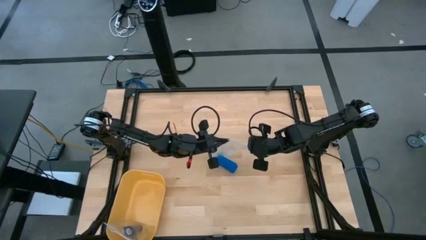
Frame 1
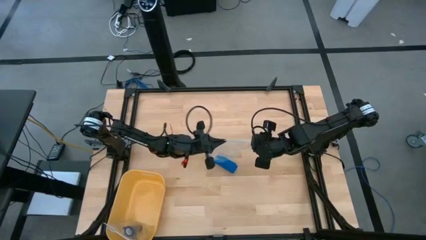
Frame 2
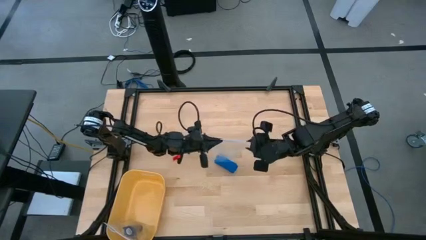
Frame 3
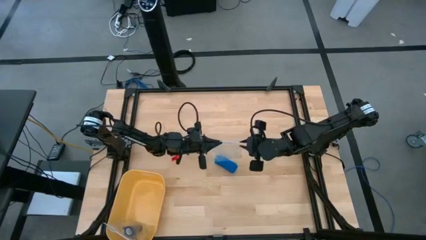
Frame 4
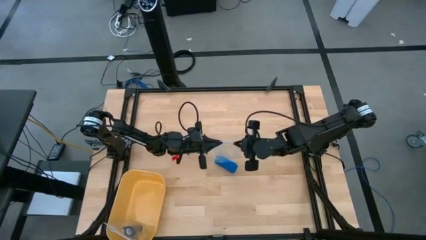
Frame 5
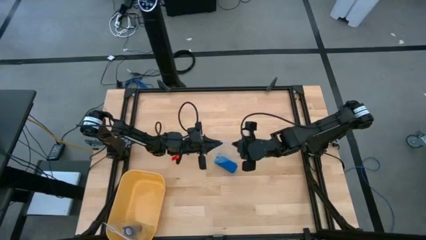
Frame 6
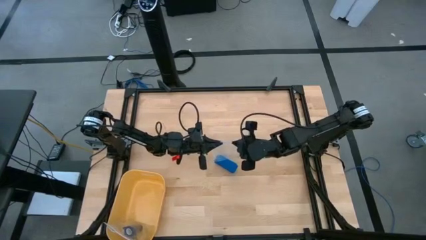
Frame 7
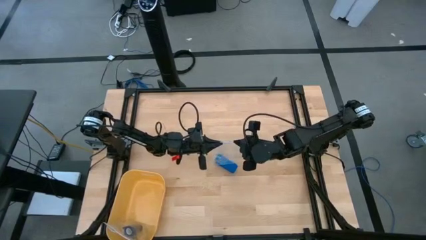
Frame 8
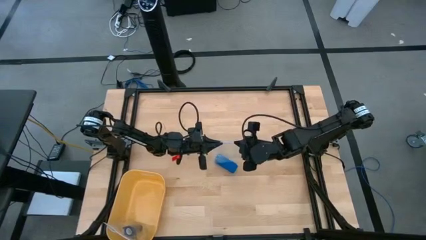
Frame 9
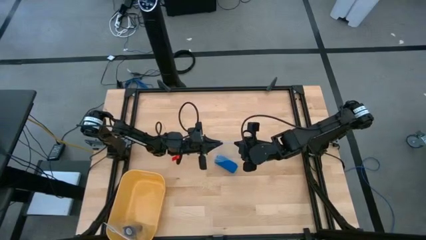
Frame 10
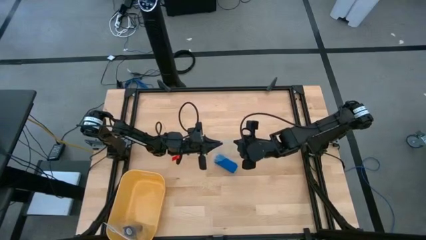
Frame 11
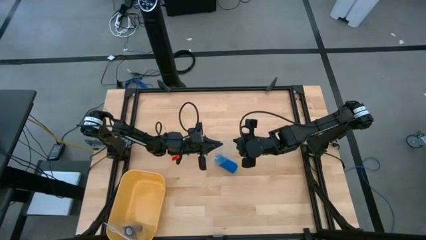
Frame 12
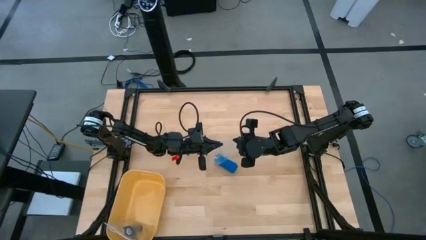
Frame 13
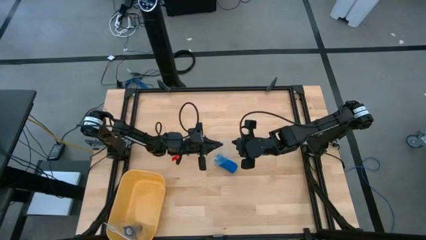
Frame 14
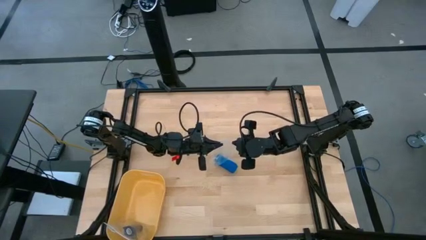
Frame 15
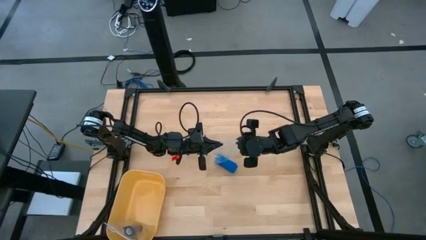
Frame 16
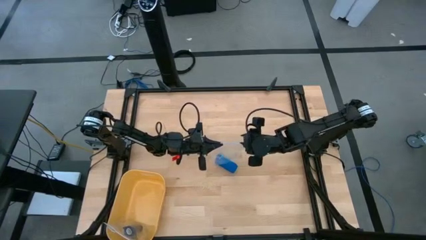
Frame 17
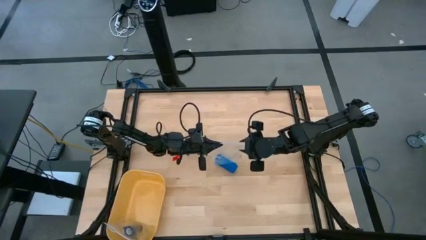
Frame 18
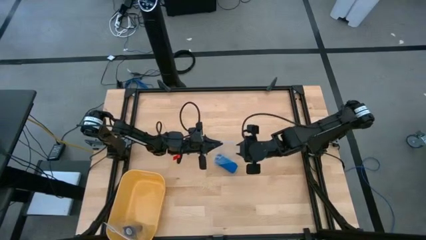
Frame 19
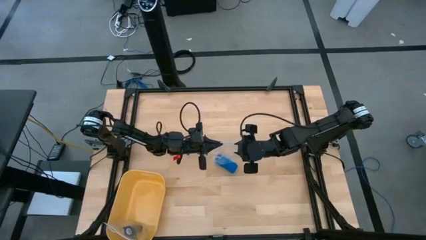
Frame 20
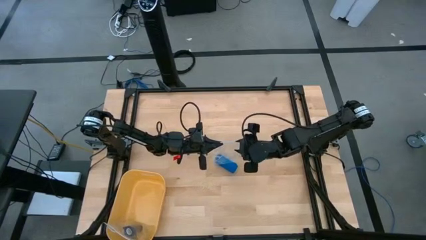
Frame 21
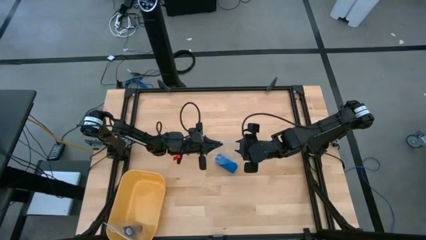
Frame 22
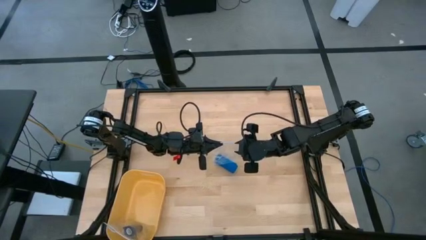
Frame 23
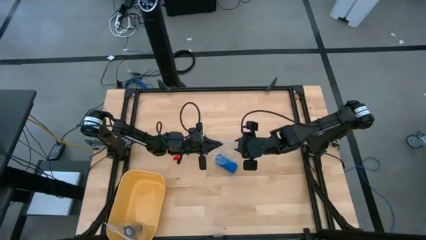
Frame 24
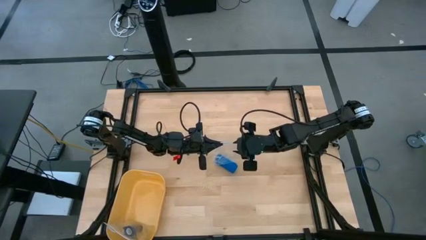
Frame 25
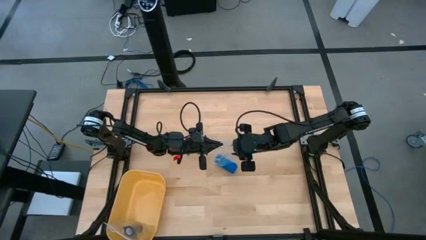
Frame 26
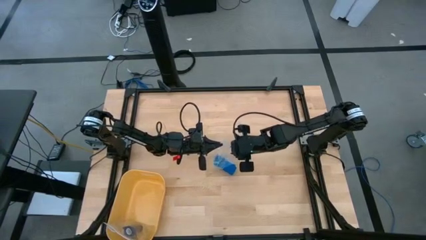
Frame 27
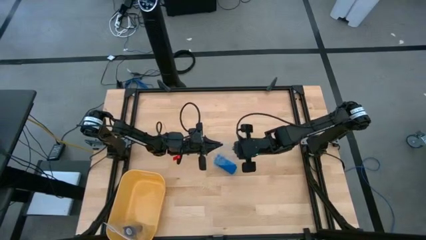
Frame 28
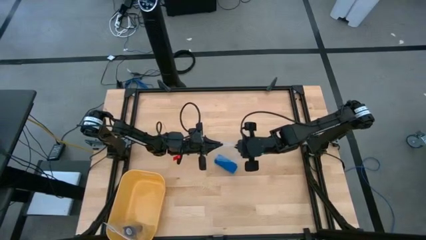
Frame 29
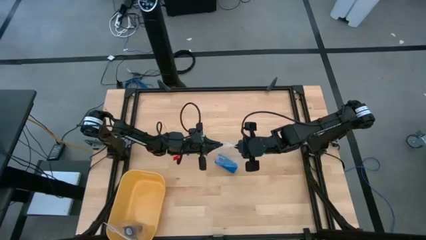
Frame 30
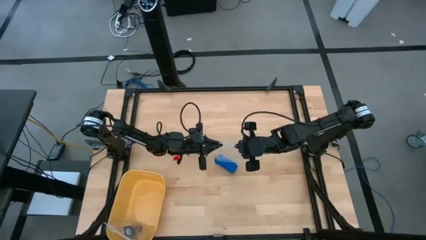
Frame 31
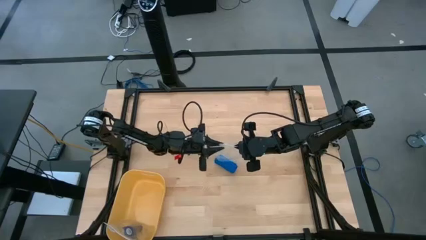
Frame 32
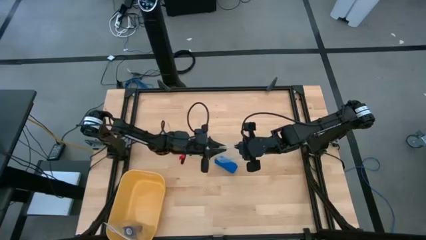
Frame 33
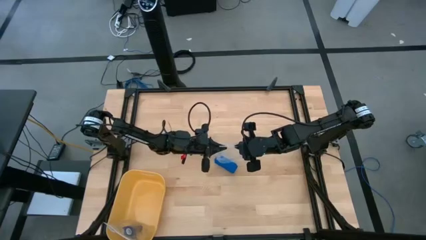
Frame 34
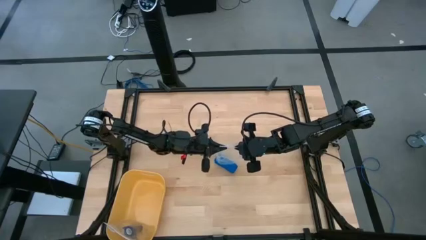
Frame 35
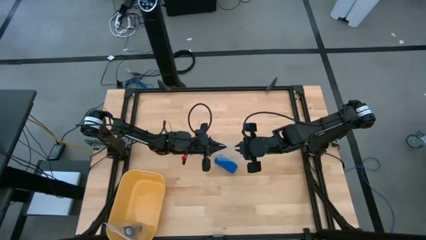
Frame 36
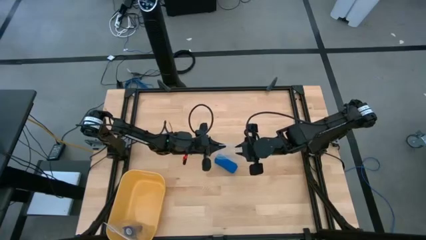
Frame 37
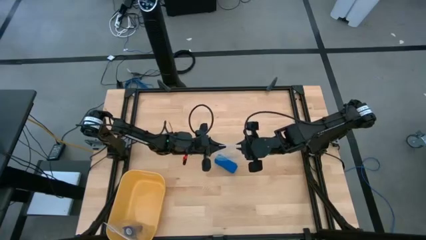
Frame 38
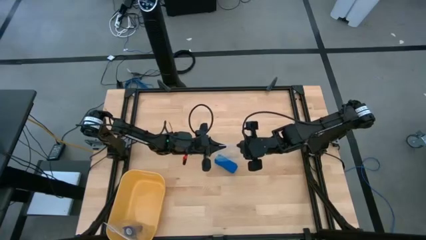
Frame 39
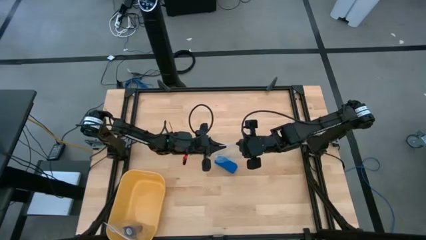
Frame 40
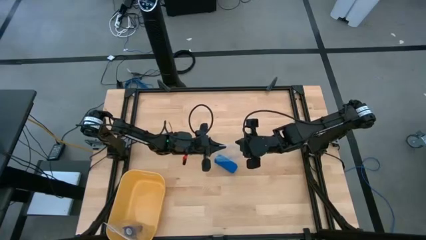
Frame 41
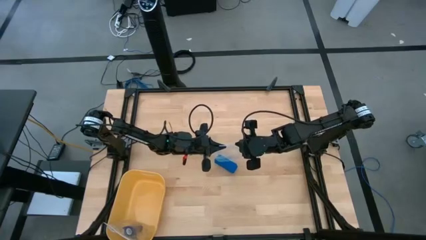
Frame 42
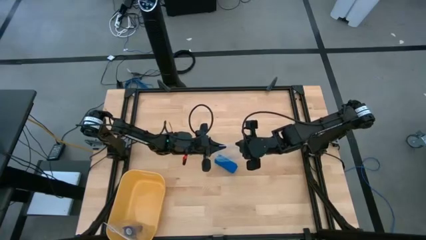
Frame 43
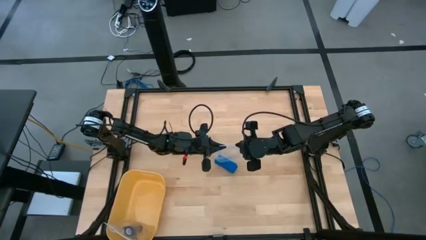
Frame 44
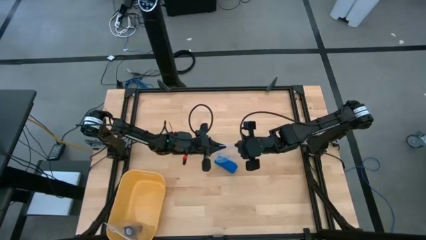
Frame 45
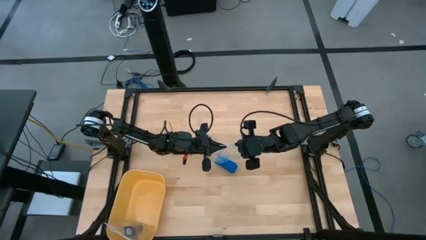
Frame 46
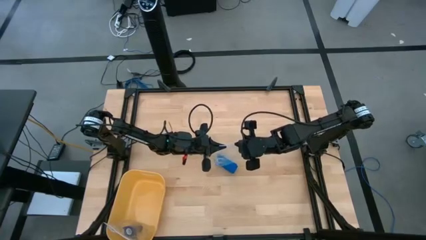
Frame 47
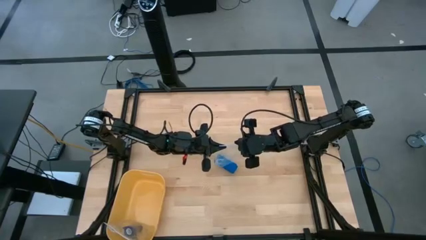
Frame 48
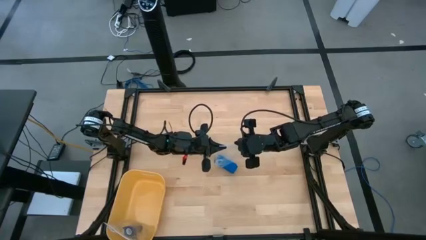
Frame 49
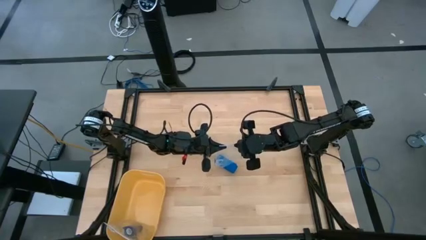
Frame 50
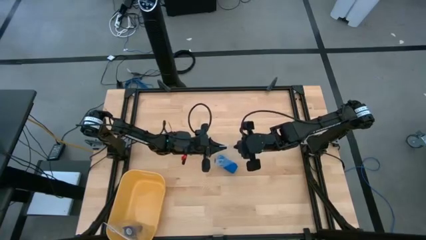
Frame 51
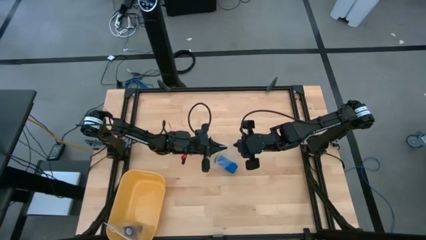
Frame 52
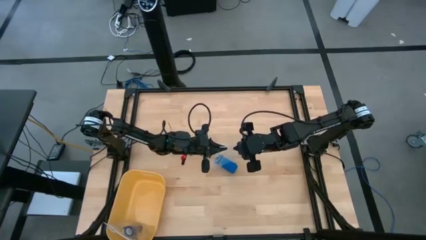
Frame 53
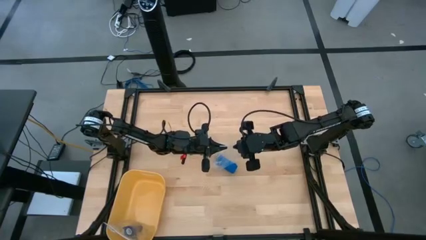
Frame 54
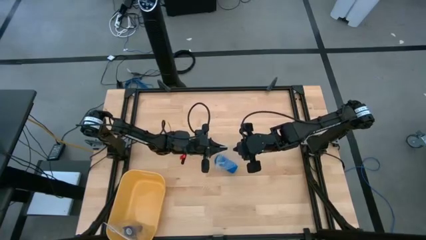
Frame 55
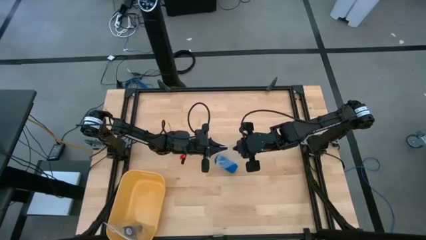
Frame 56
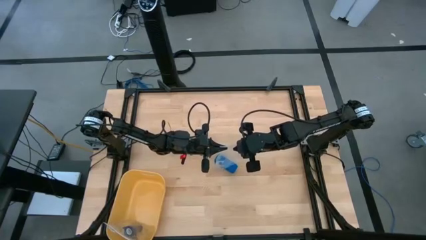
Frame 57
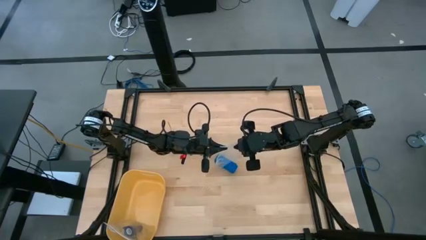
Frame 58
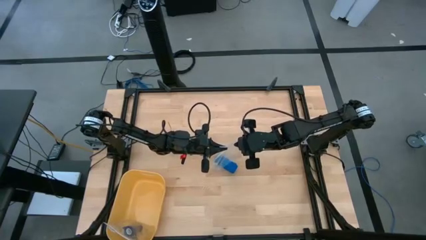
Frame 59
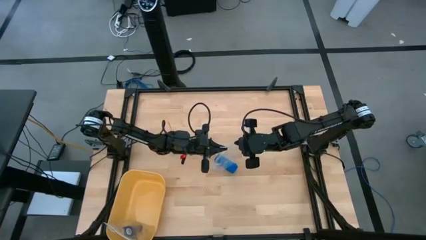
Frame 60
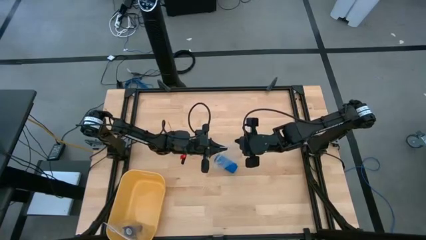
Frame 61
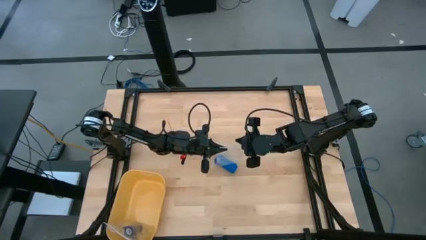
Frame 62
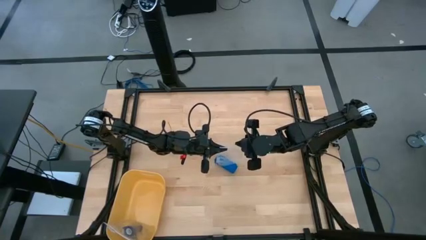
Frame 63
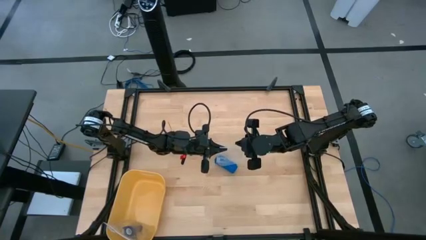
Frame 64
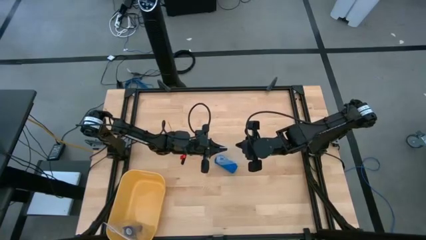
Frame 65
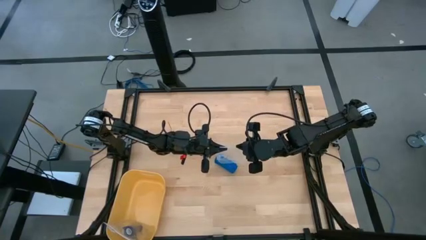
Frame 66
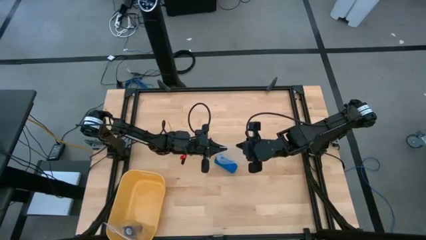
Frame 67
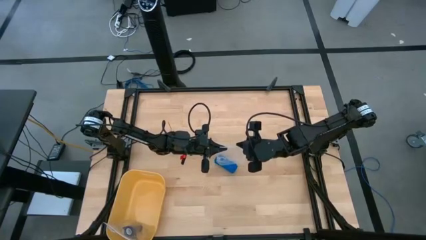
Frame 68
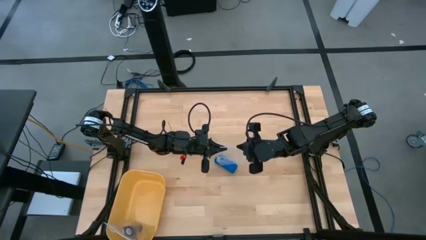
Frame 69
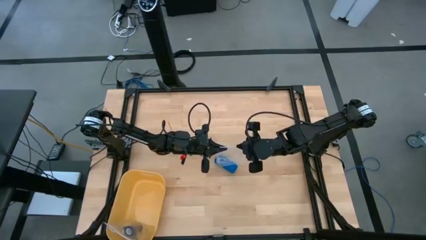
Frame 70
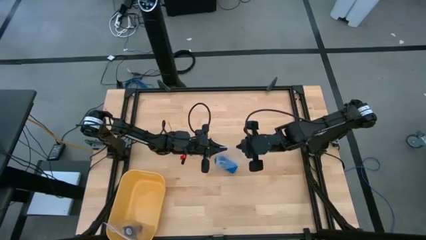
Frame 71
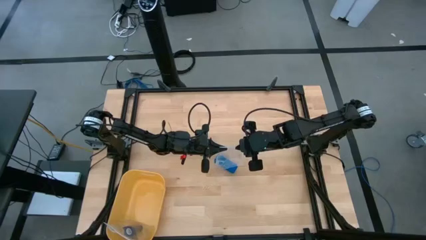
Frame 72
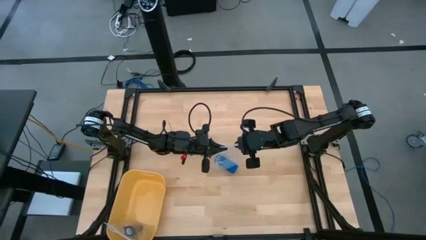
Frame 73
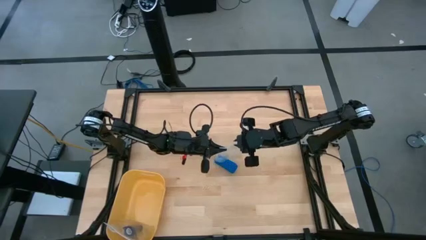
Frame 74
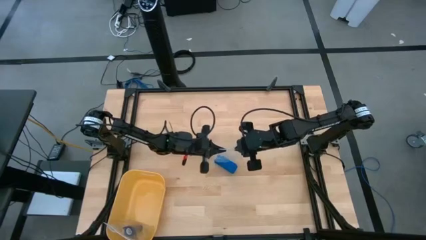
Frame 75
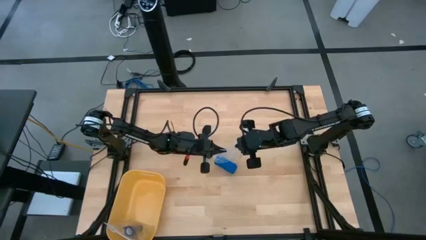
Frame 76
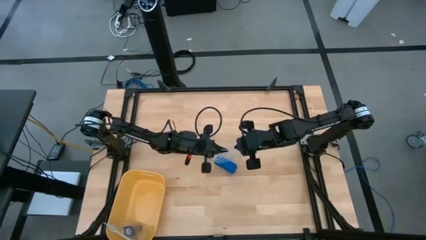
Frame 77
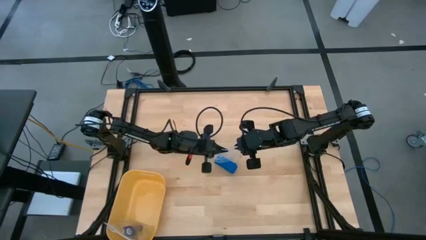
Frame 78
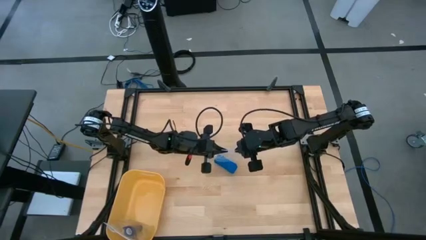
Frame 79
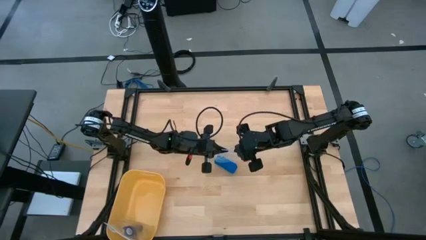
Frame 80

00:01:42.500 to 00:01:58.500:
Task: Roll bandage
Open the zip bag
